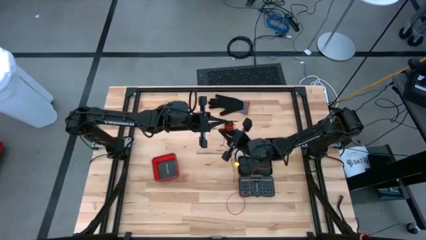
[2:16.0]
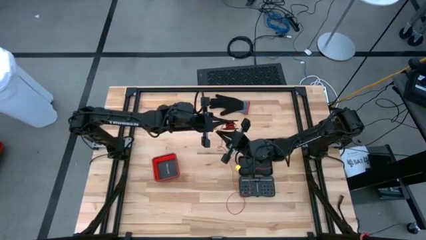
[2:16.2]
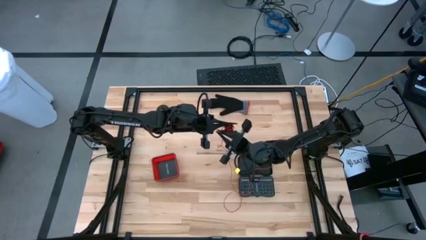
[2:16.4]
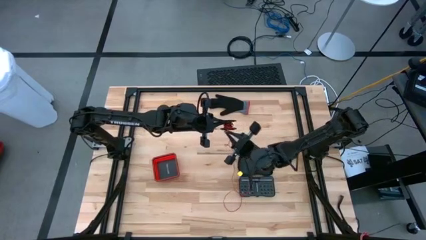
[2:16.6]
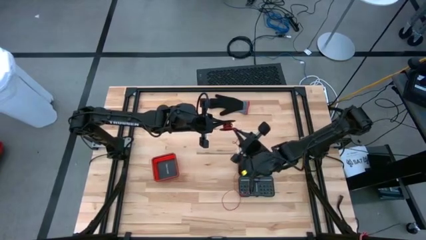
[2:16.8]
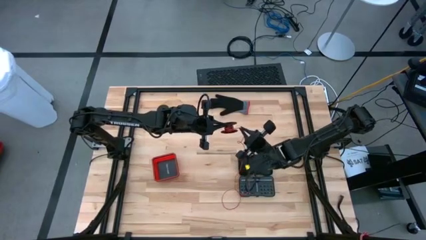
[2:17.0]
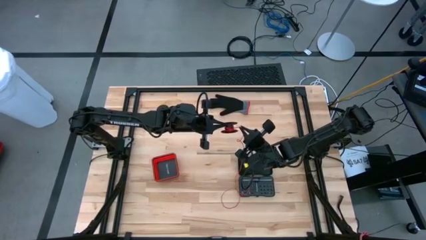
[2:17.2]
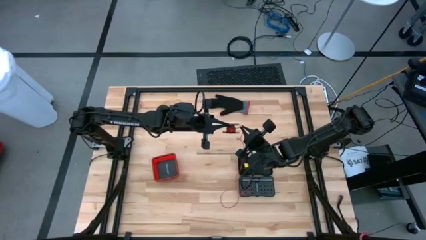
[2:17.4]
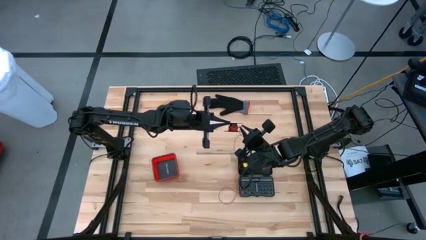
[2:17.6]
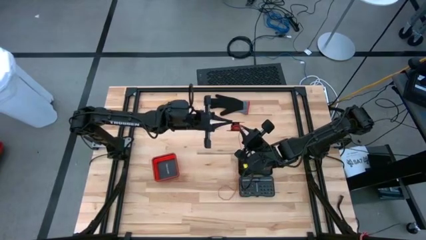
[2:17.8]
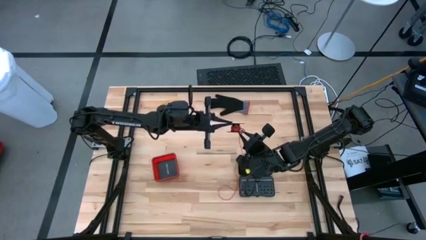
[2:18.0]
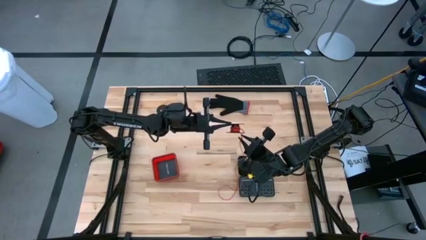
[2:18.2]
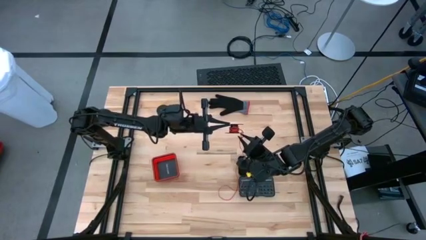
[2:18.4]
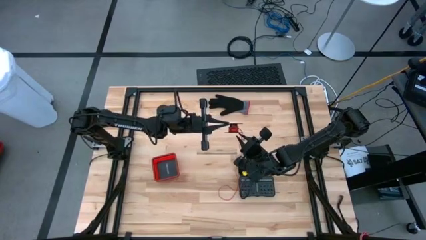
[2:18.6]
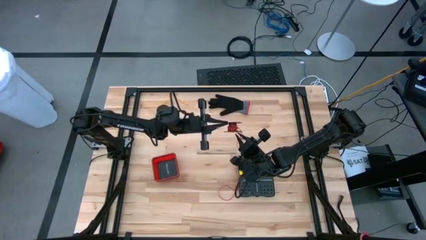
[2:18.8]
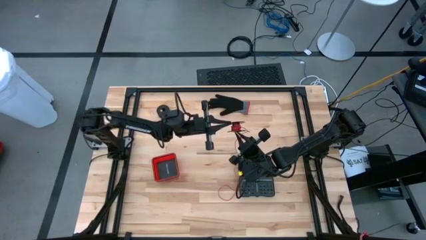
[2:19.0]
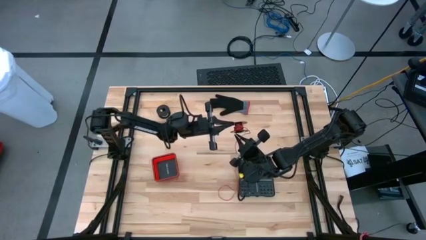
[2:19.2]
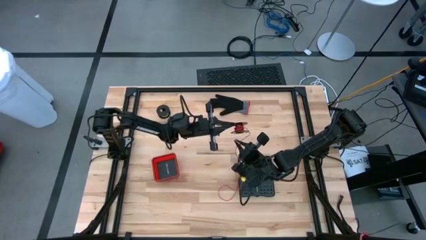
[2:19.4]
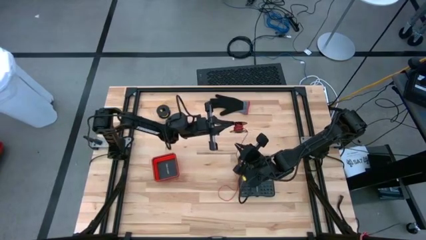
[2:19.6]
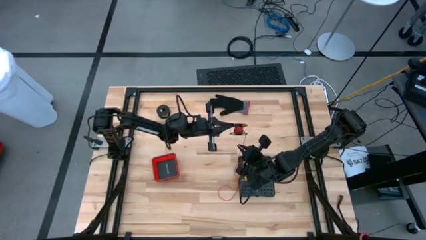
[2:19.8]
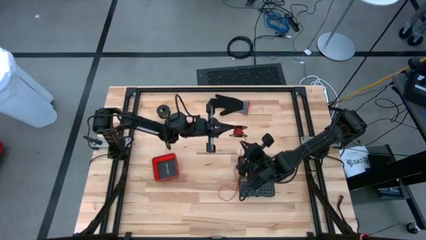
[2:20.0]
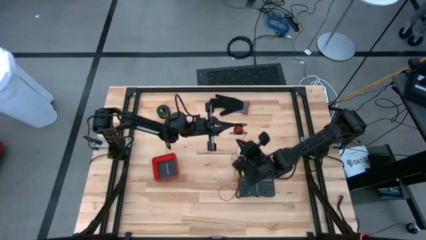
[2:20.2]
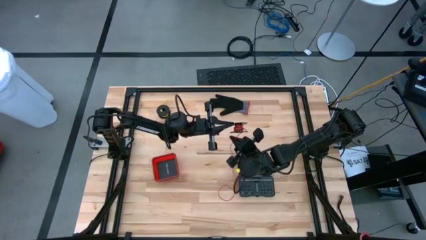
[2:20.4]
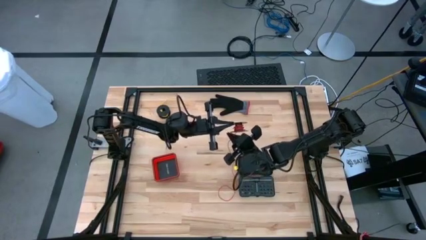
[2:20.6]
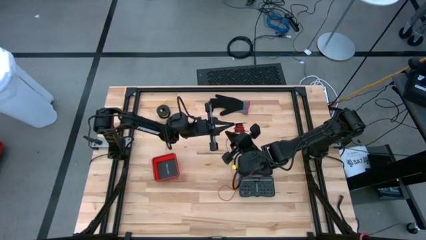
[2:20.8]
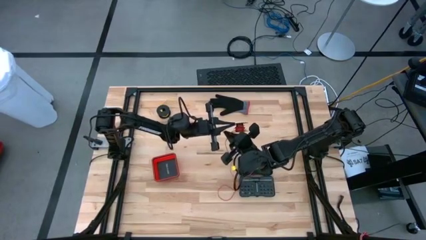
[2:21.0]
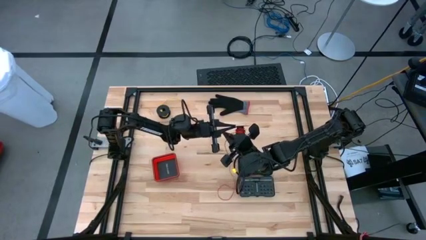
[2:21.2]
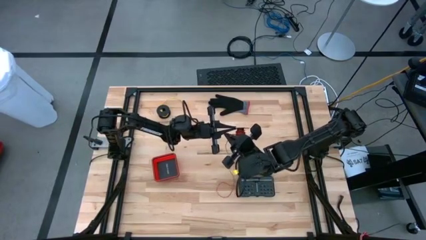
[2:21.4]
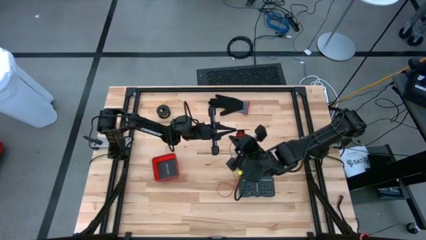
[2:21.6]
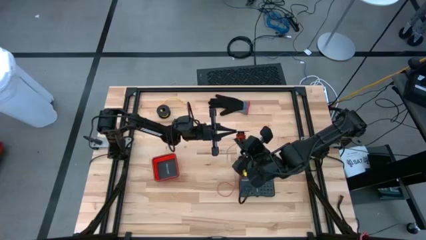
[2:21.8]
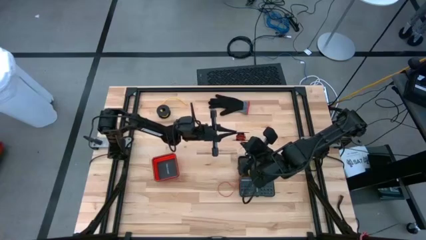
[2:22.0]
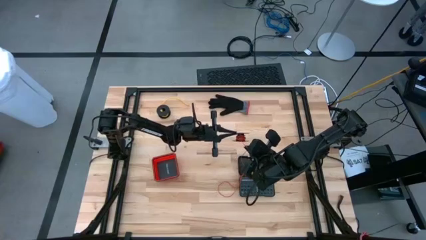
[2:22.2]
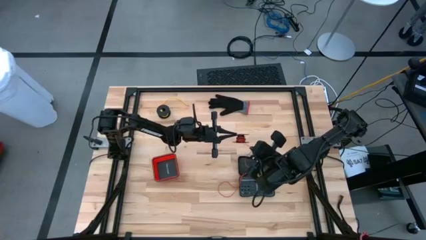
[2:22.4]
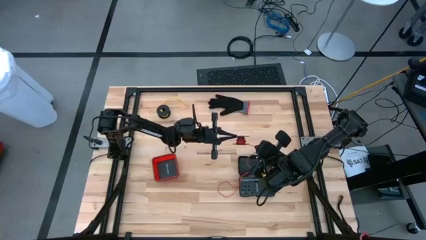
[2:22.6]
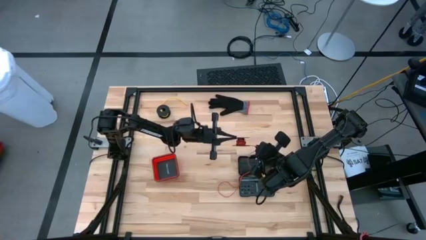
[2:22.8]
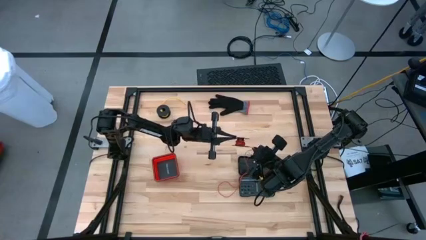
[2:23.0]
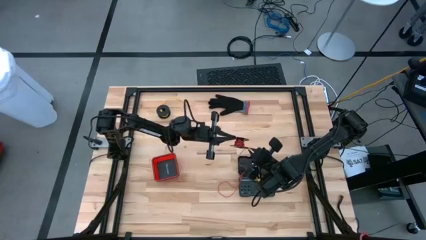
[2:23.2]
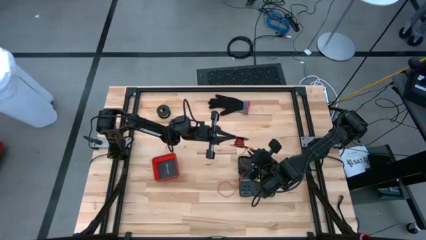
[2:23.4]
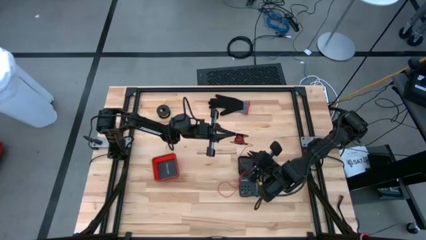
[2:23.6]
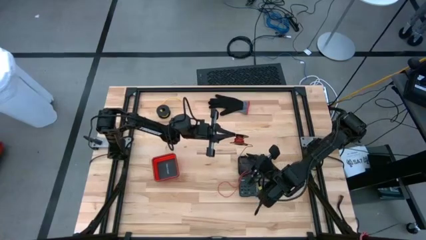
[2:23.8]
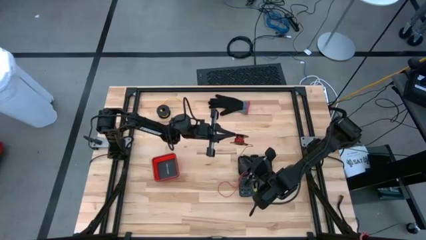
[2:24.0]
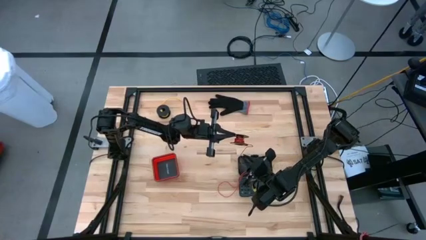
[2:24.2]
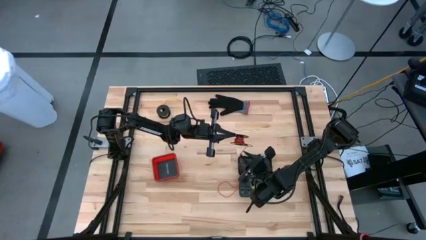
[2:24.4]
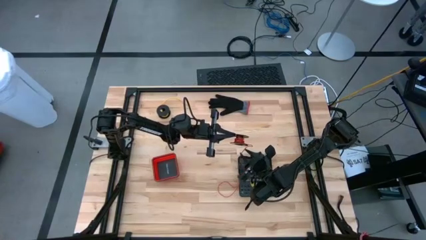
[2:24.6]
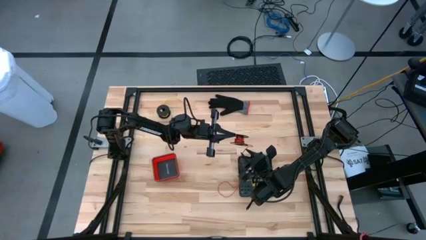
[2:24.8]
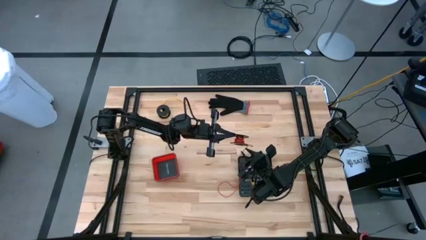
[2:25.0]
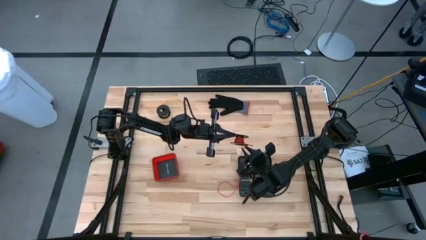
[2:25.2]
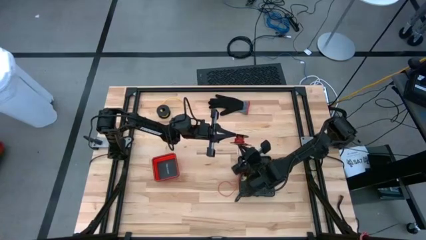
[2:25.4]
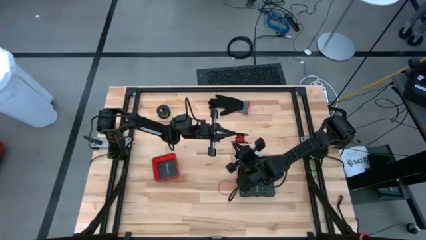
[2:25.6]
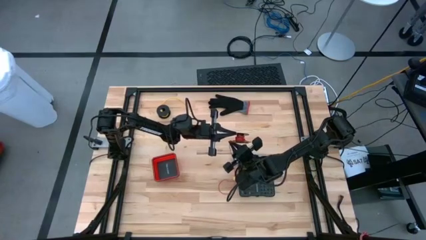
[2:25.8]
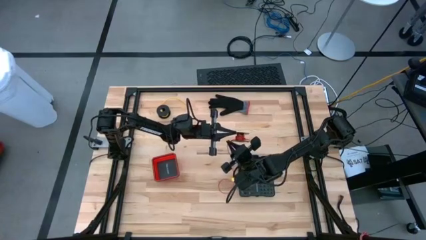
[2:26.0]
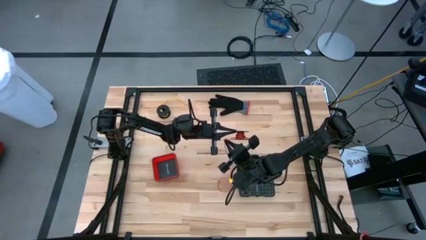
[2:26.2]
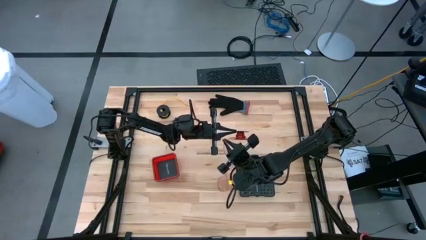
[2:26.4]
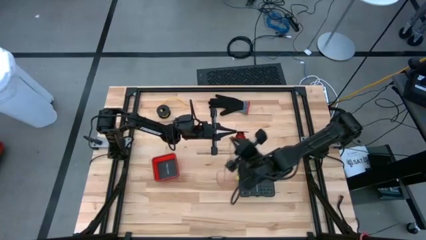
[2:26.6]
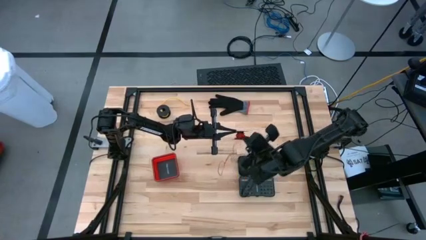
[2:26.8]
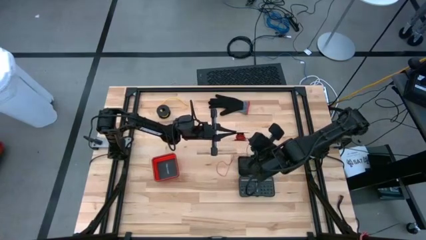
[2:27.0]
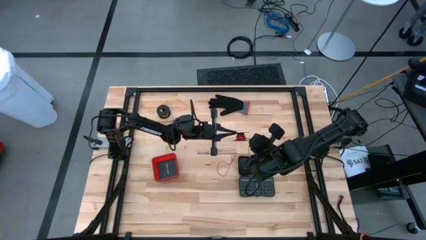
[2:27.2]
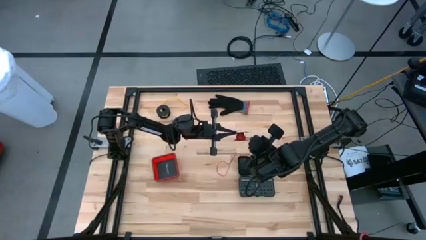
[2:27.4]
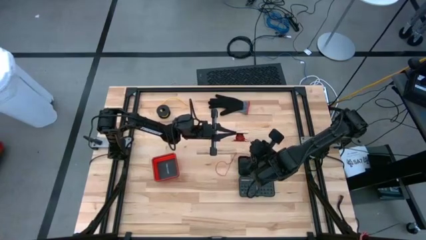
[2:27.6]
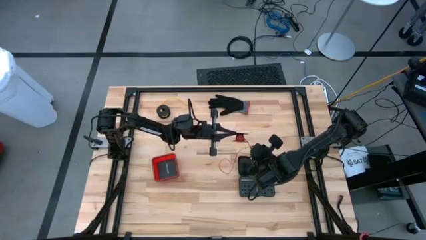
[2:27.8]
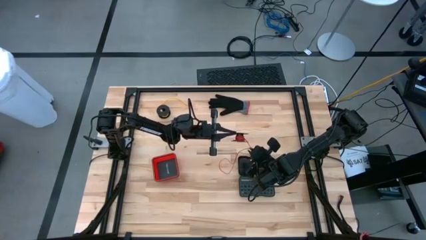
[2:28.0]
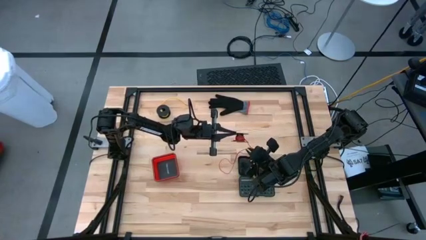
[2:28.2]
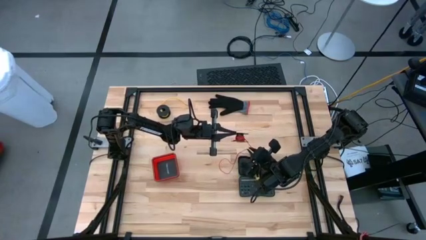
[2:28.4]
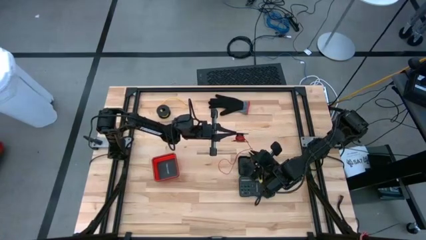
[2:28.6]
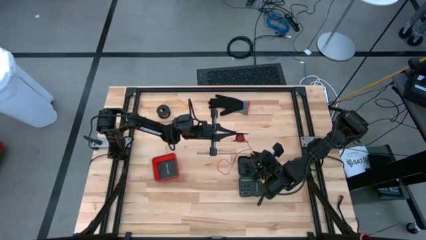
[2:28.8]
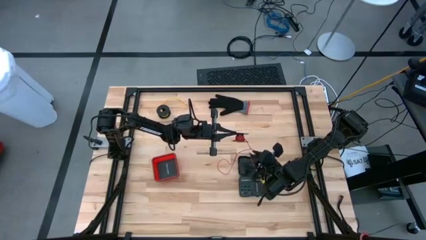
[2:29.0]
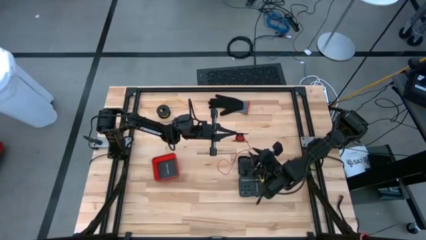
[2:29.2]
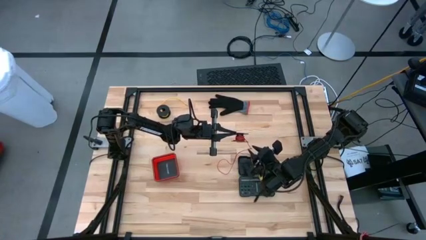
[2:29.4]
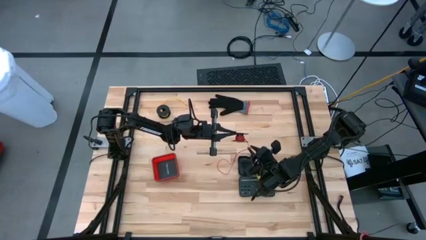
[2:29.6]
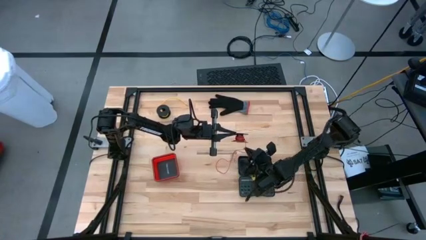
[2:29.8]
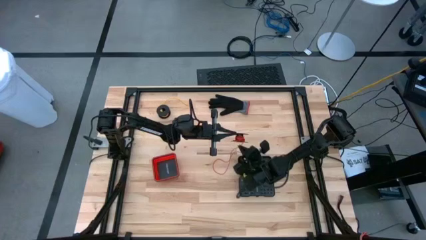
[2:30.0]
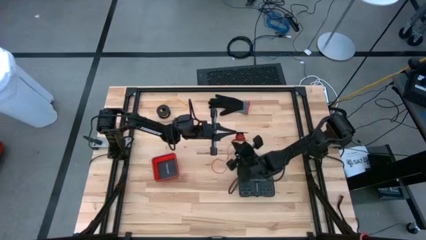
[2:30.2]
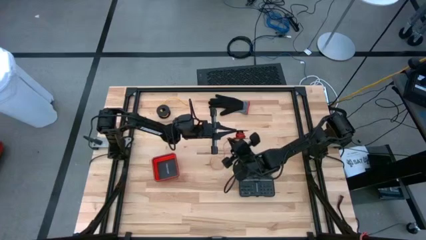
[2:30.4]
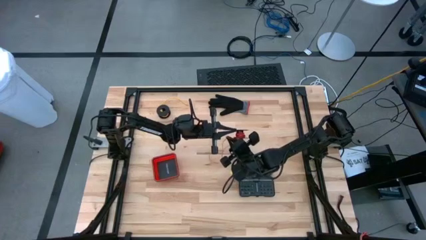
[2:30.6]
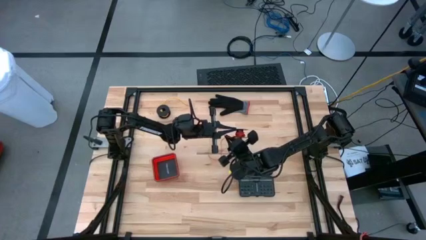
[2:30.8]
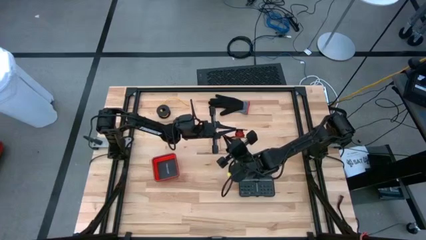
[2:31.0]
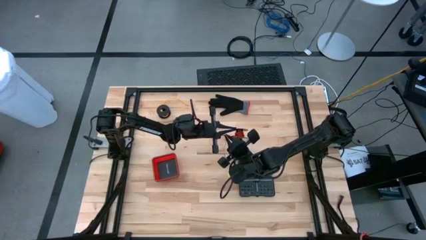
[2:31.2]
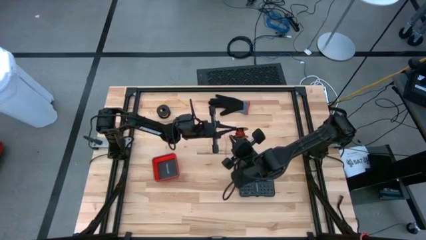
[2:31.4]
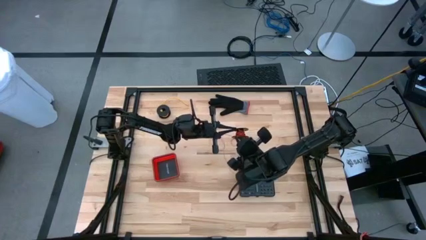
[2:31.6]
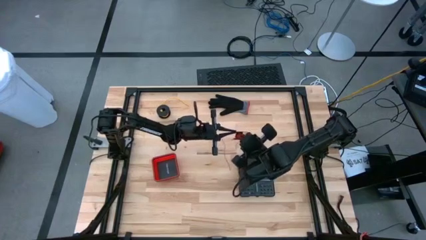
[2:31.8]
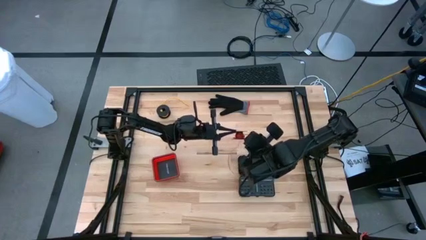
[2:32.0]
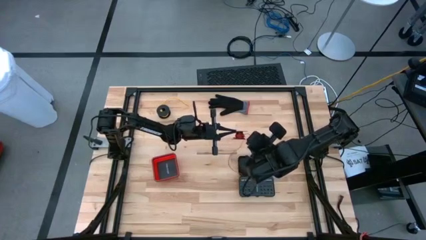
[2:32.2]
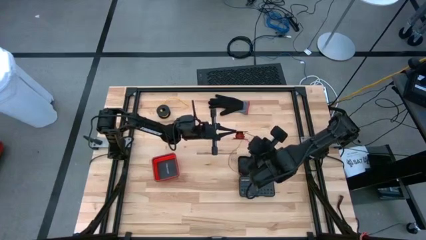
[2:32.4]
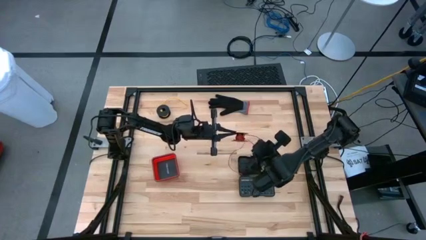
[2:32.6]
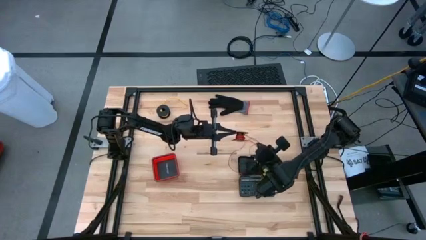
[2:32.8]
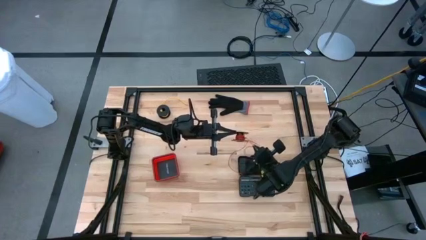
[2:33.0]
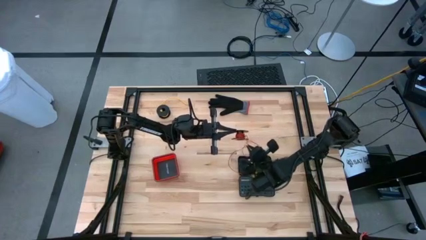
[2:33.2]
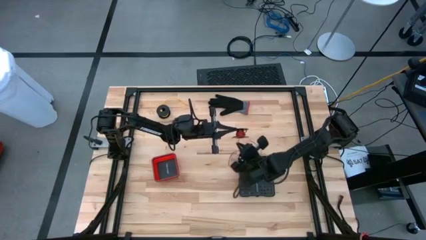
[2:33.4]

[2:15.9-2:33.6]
Task: Coil cords
Coil the red wire onto the spool
